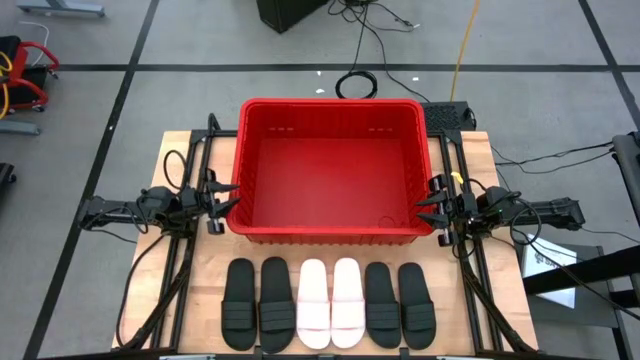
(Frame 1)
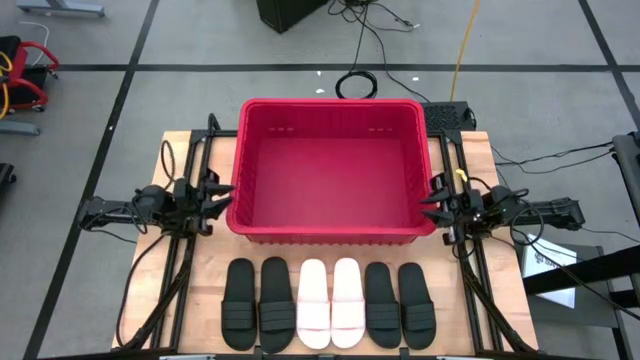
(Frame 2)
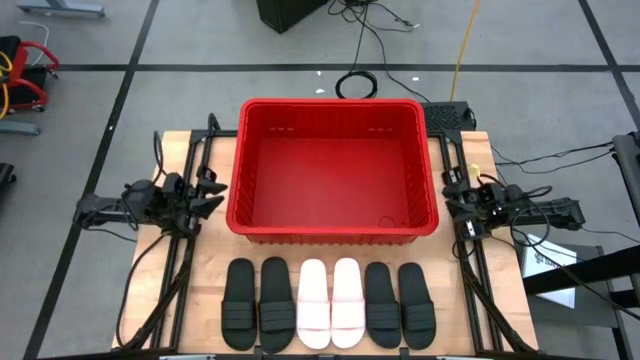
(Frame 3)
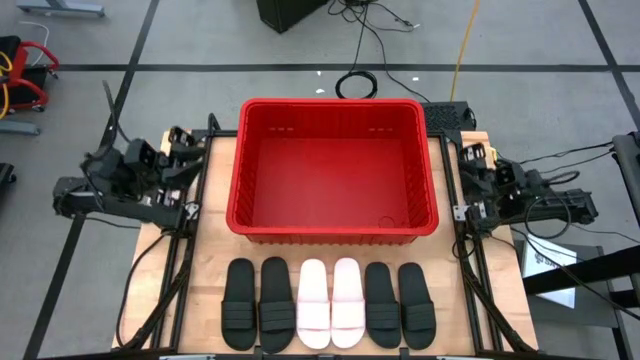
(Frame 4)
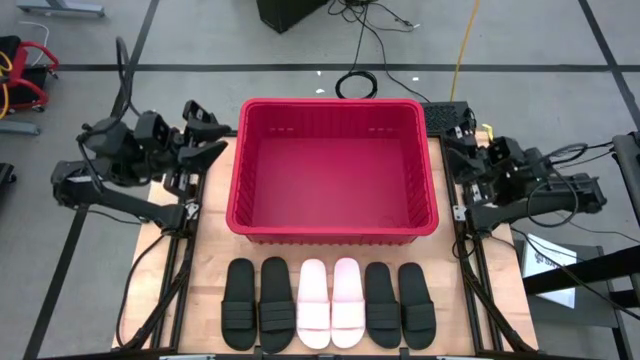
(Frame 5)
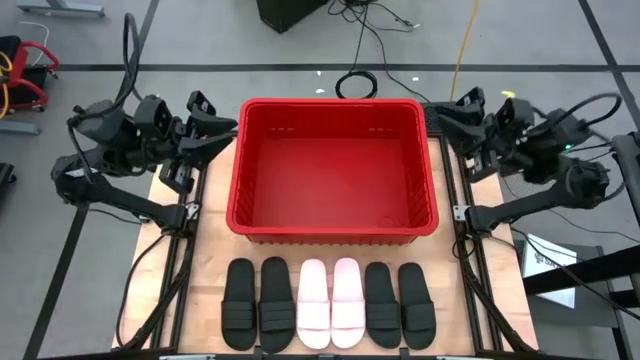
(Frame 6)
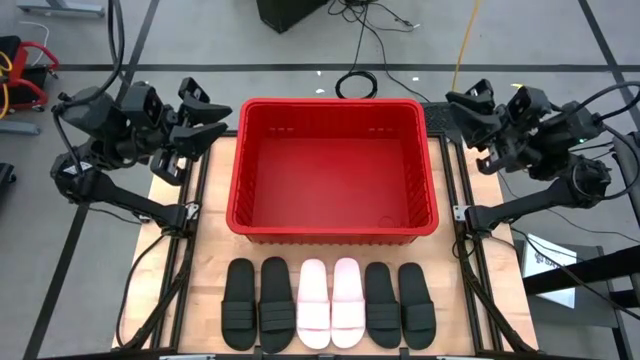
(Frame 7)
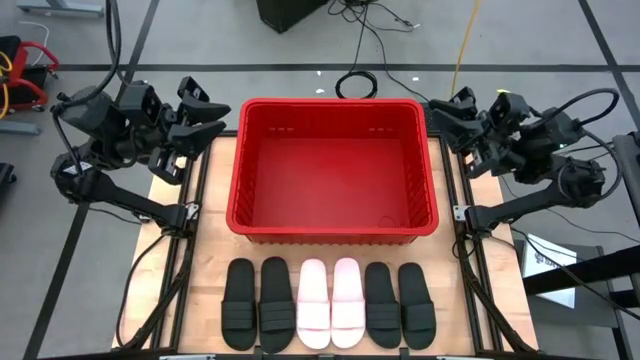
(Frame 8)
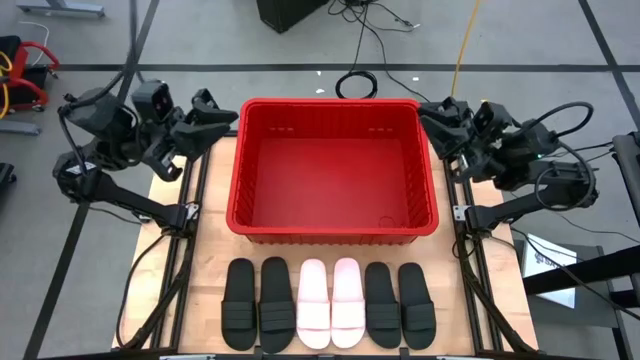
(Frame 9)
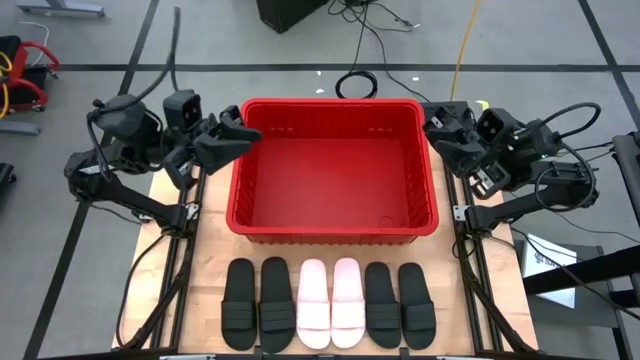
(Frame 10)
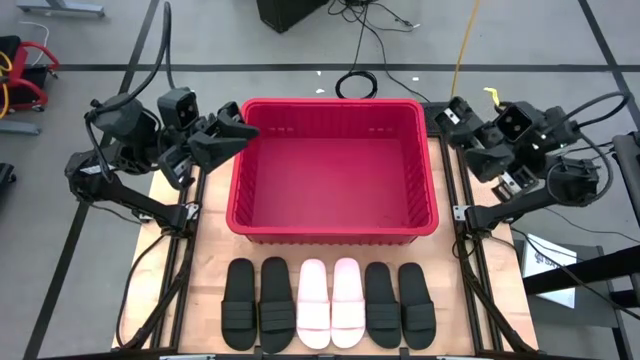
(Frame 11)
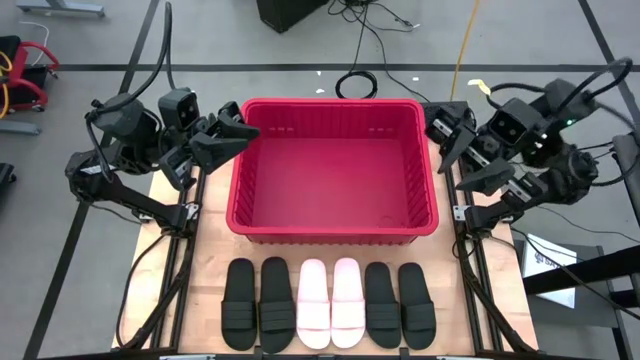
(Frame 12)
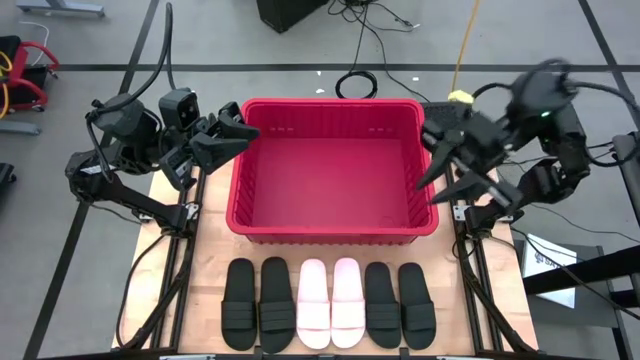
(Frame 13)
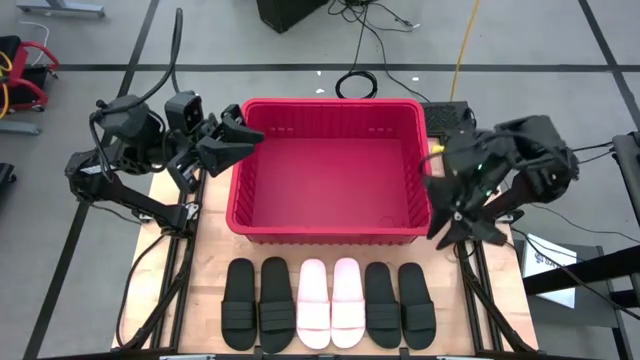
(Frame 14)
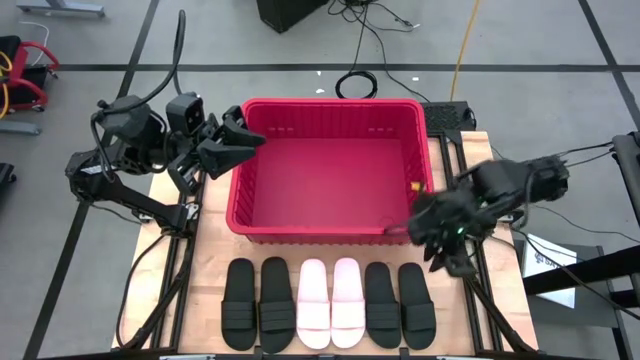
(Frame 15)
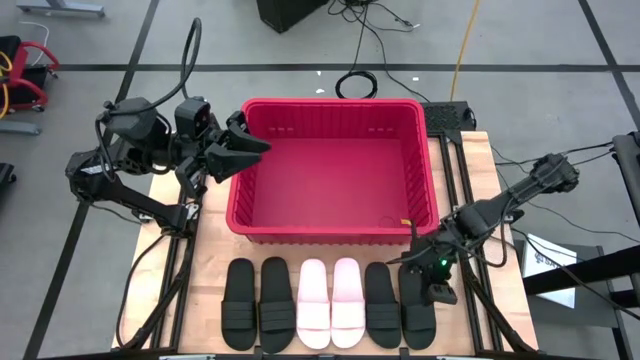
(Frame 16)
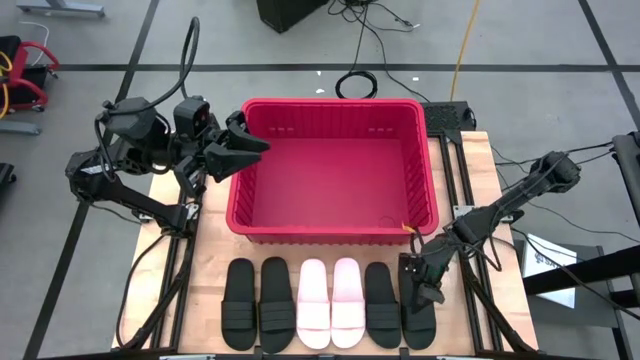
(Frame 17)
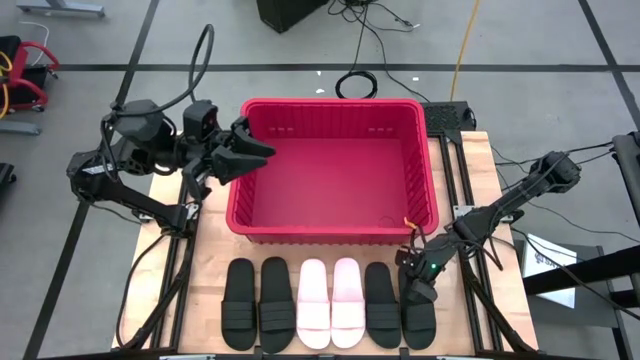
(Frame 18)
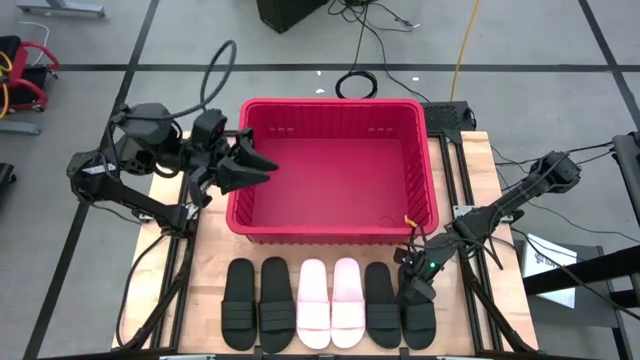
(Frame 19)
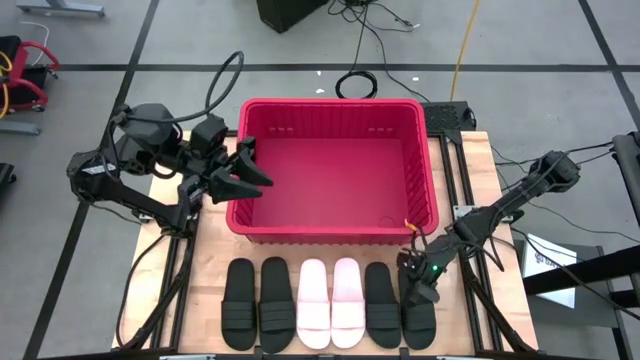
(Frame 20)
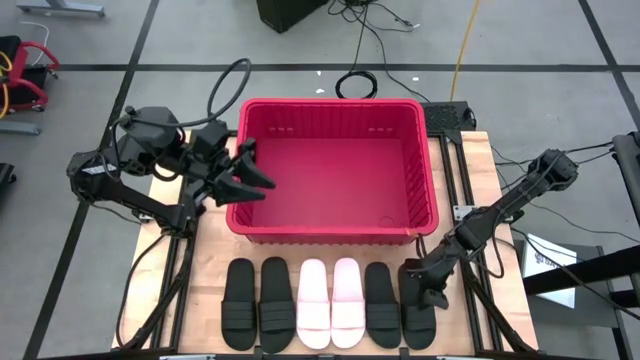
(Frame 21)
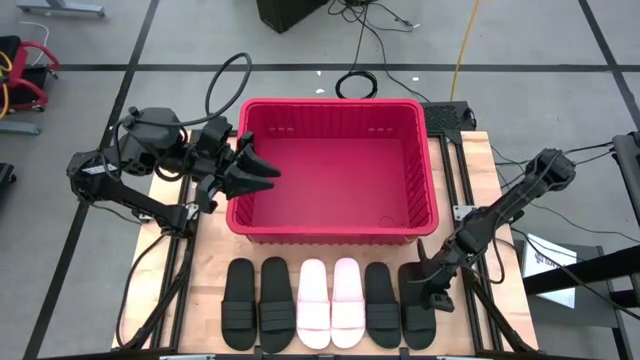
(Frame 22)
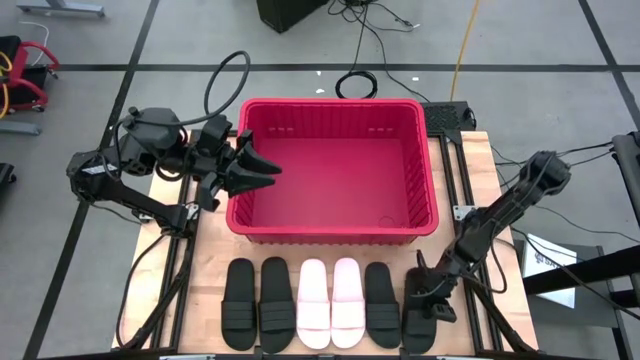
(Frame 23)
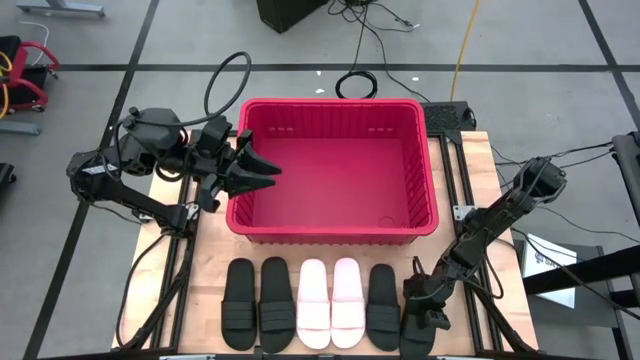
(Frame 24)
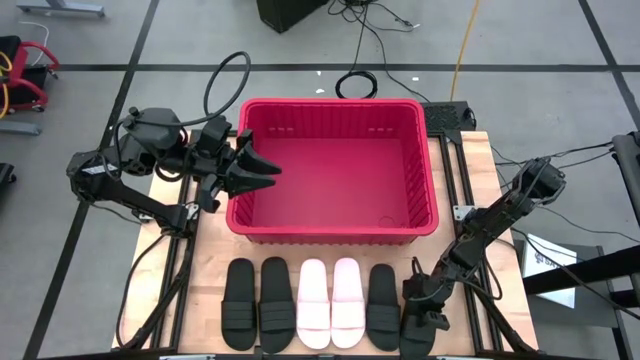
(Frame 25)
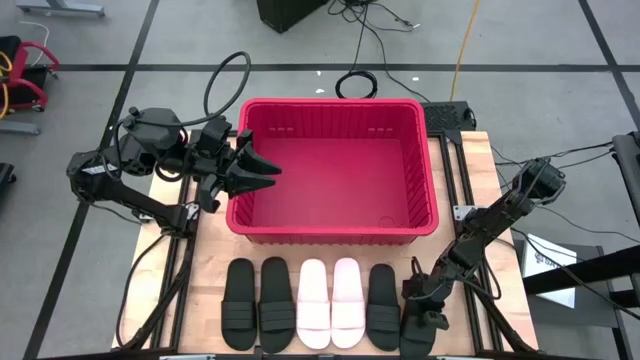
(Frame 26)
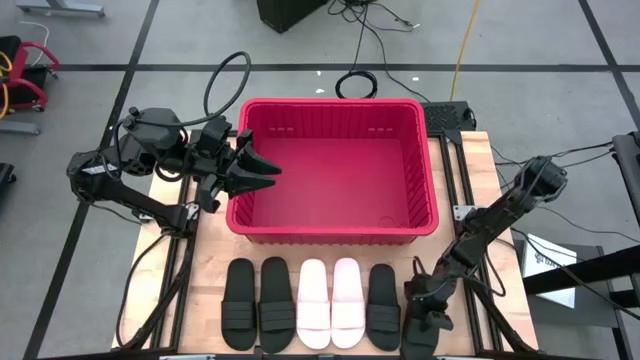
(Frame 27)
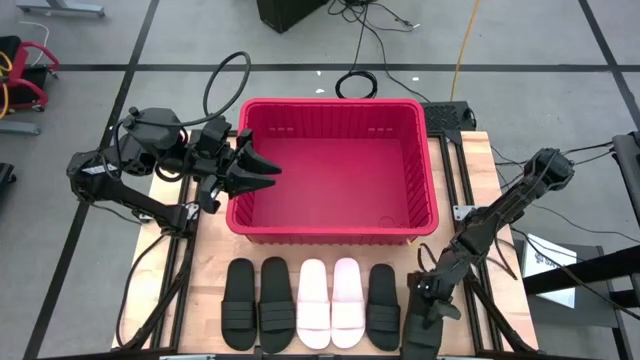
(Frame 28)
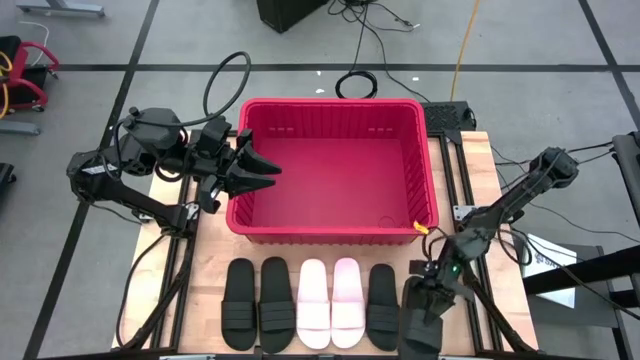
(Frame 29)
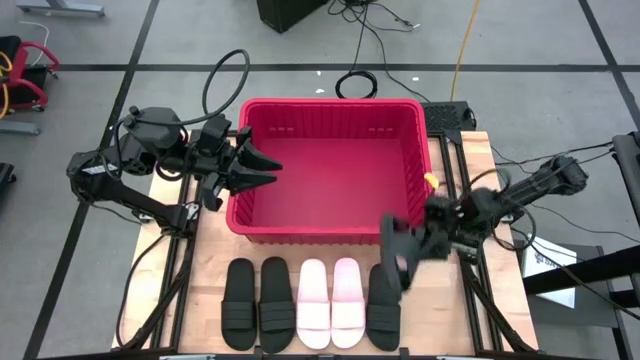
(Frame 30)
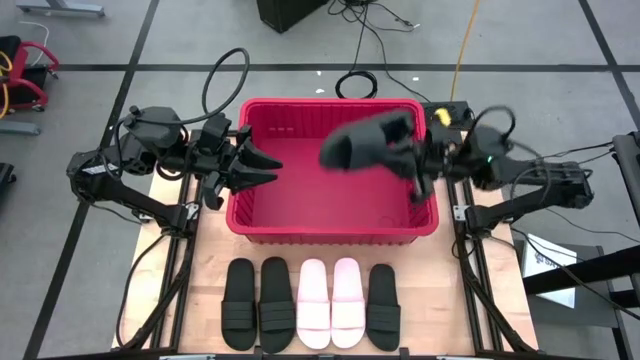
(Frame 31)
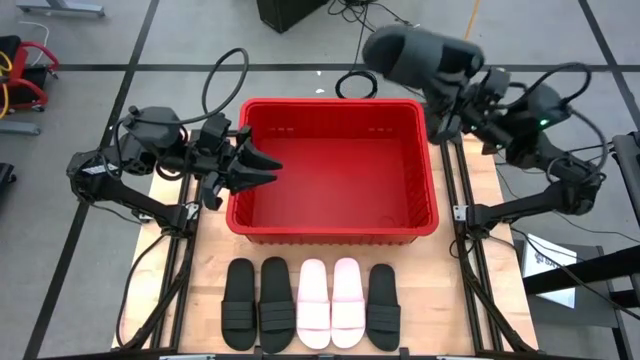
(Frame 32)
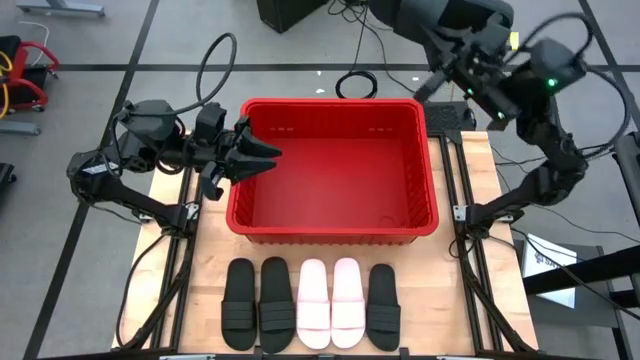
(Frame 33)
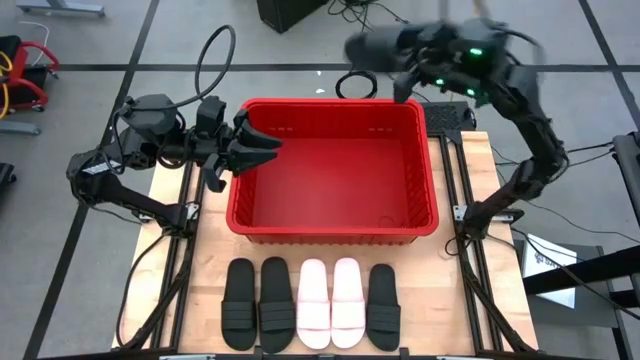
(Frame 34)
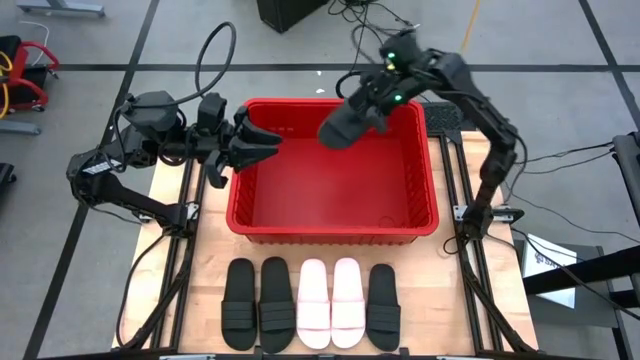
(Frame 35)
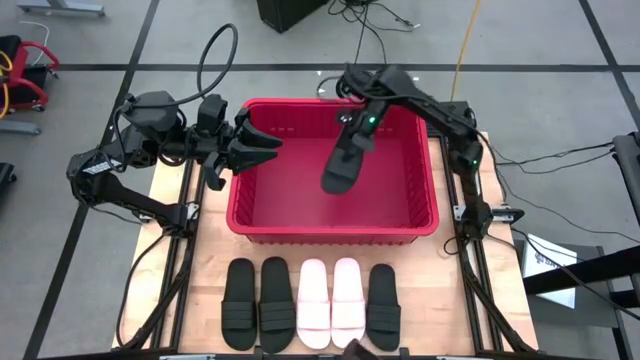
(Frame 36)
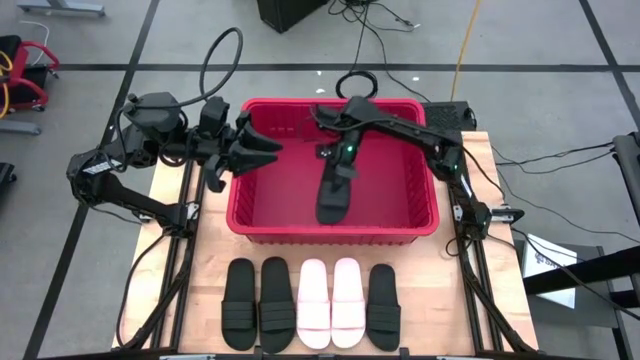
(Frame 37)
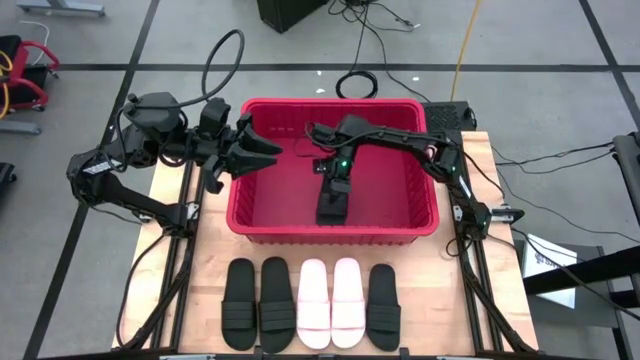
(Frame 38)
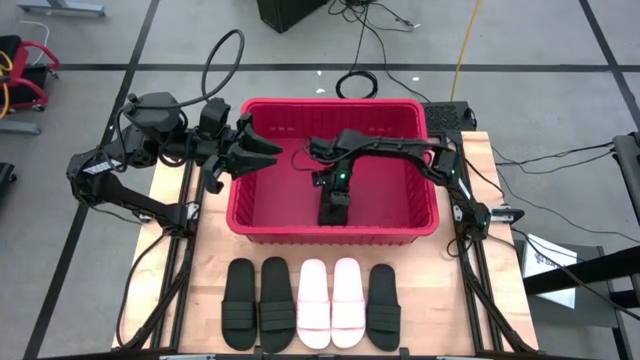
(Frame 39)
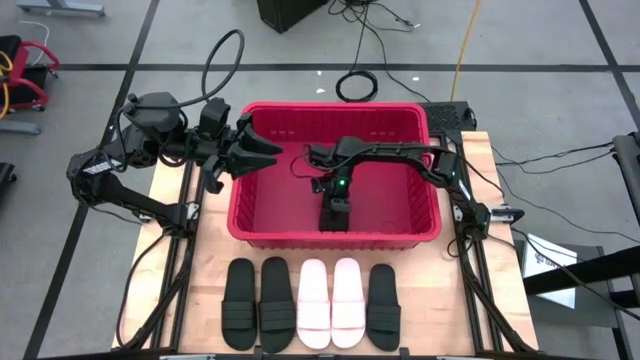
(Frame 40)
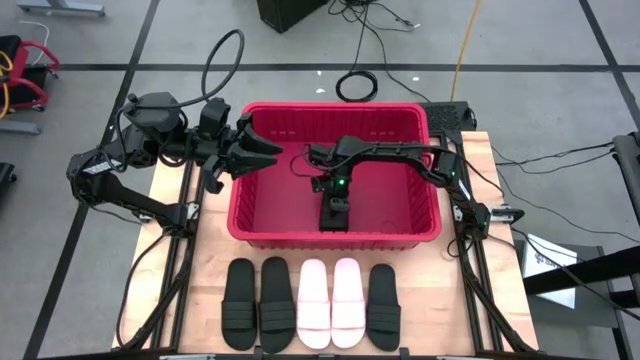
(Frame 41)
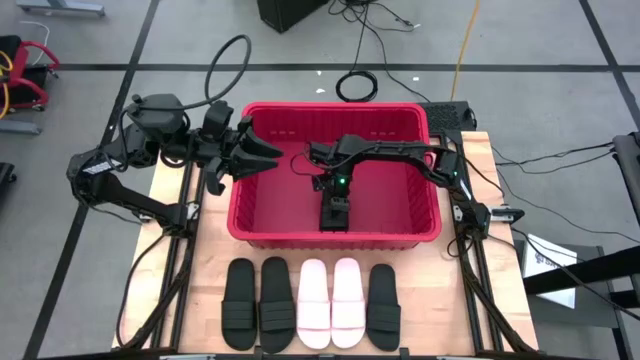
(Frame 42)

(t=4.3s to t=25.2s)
Task: Pick and place slides into bin
Put the black slipper into the red bin
